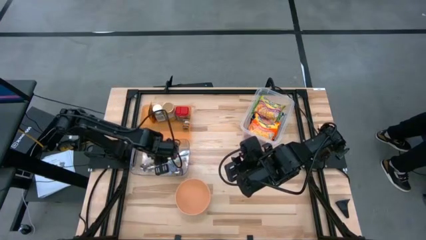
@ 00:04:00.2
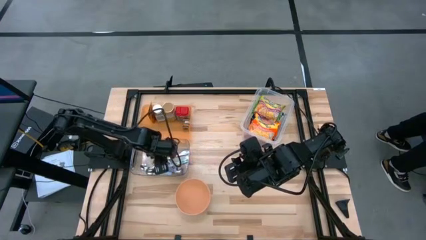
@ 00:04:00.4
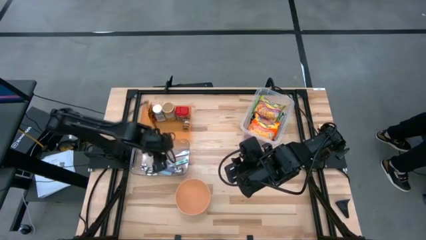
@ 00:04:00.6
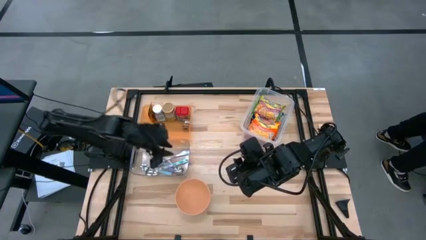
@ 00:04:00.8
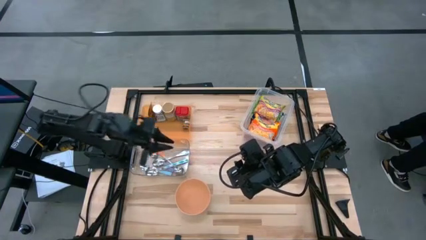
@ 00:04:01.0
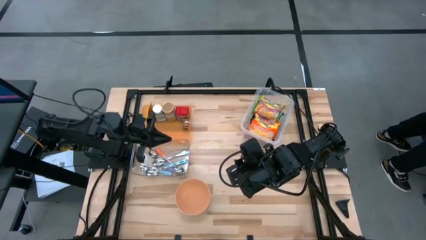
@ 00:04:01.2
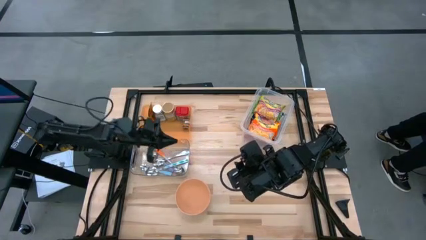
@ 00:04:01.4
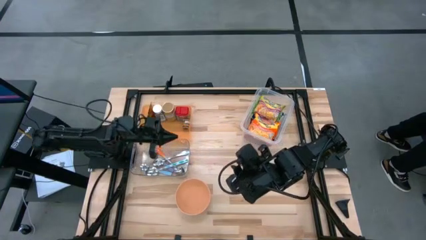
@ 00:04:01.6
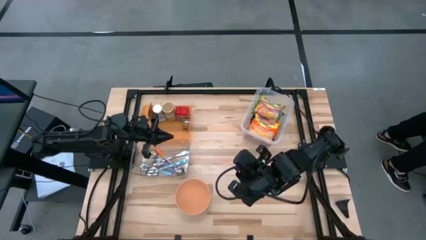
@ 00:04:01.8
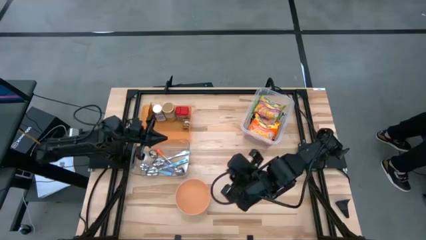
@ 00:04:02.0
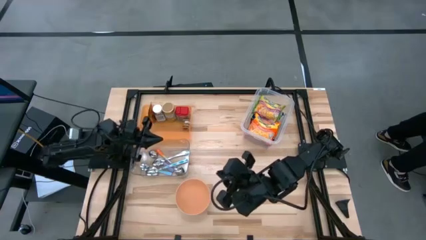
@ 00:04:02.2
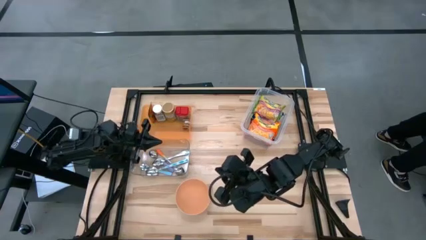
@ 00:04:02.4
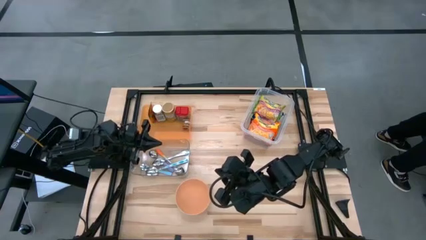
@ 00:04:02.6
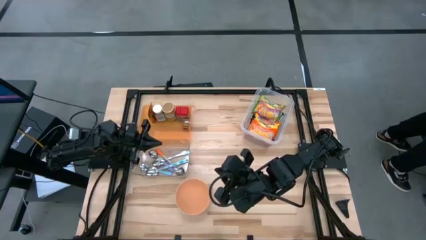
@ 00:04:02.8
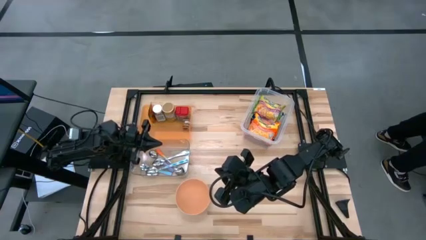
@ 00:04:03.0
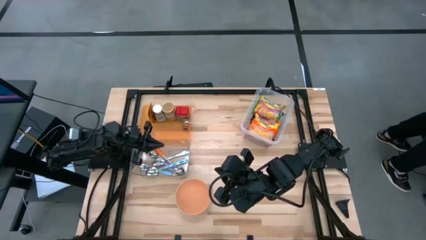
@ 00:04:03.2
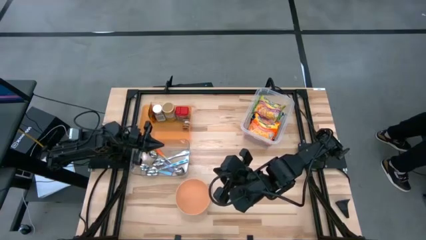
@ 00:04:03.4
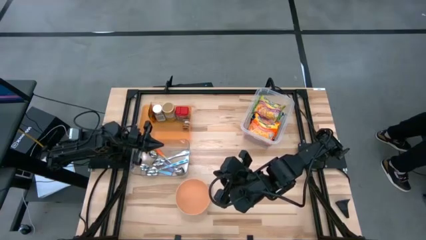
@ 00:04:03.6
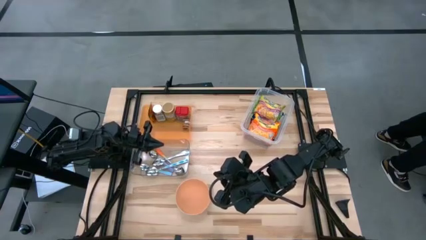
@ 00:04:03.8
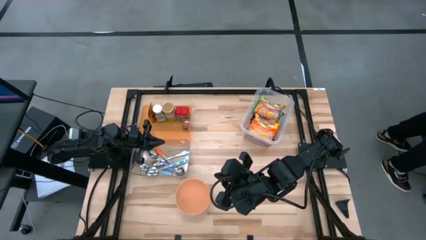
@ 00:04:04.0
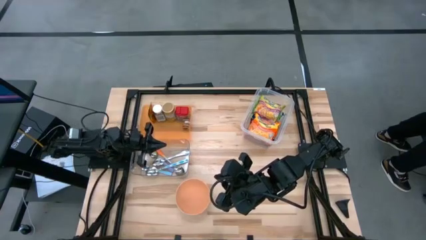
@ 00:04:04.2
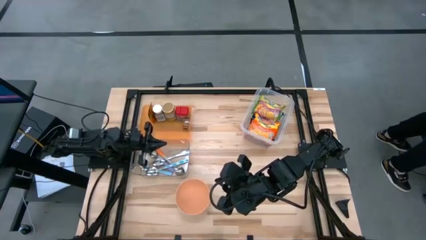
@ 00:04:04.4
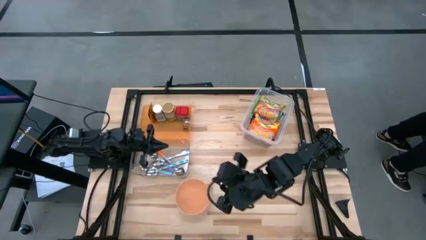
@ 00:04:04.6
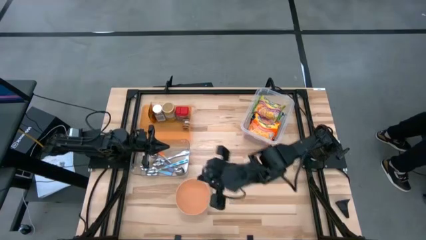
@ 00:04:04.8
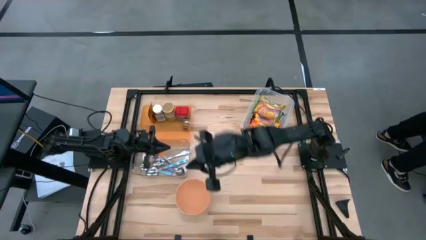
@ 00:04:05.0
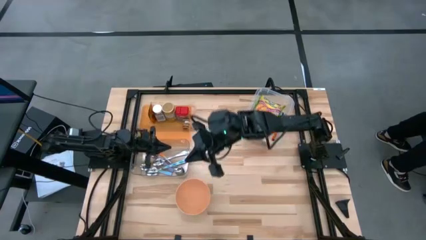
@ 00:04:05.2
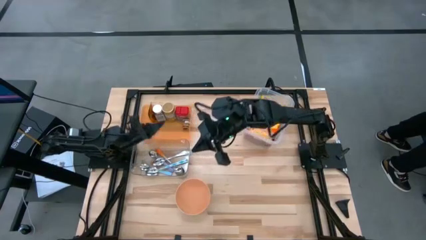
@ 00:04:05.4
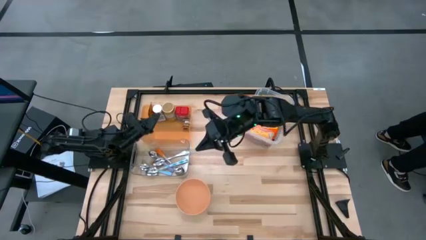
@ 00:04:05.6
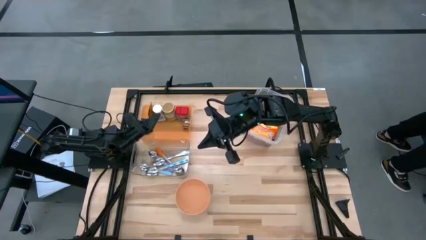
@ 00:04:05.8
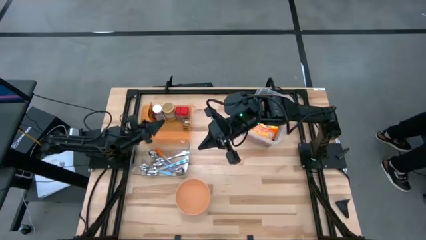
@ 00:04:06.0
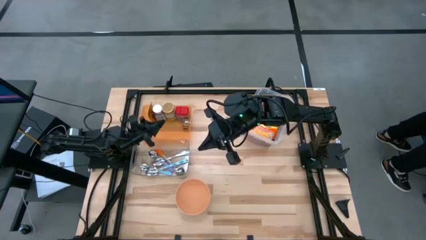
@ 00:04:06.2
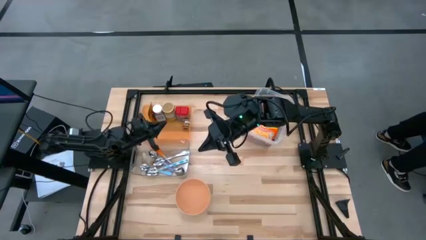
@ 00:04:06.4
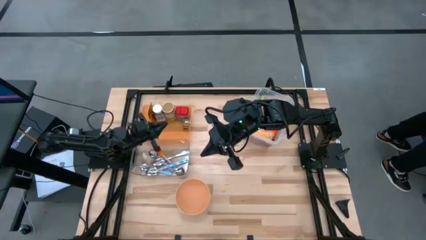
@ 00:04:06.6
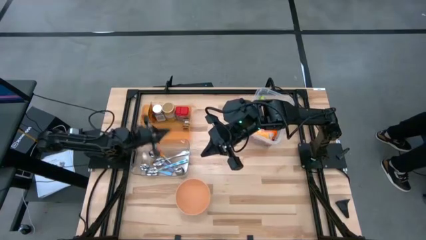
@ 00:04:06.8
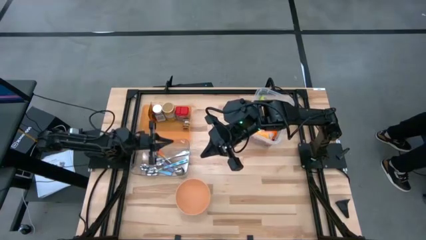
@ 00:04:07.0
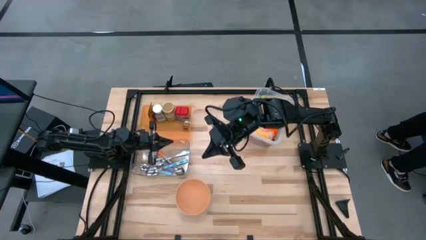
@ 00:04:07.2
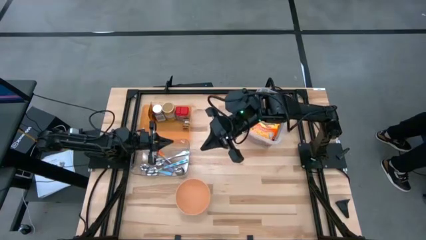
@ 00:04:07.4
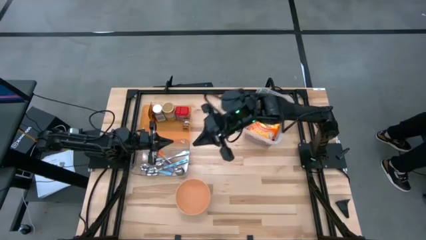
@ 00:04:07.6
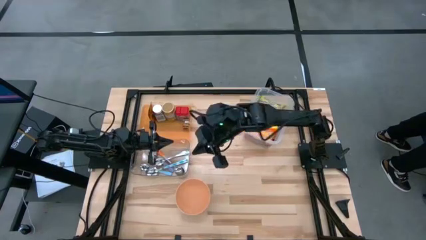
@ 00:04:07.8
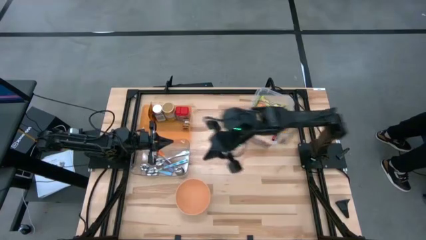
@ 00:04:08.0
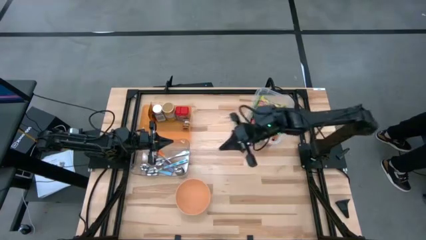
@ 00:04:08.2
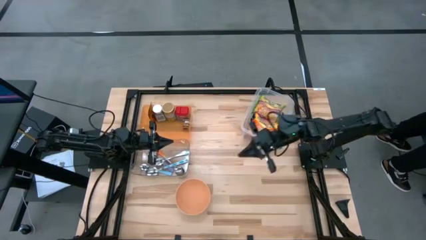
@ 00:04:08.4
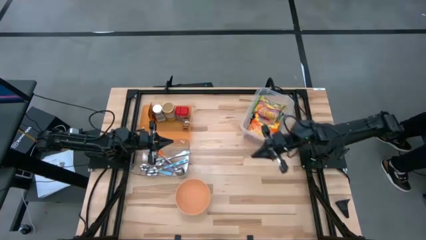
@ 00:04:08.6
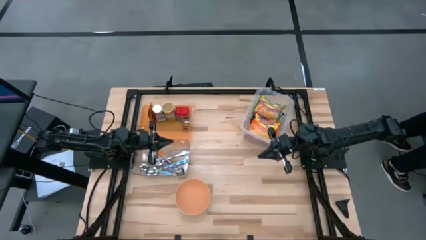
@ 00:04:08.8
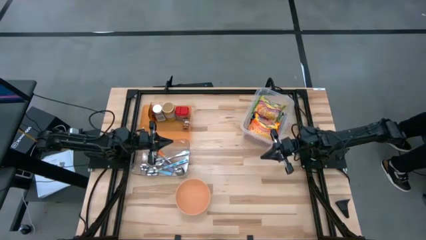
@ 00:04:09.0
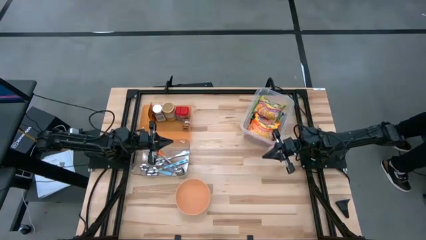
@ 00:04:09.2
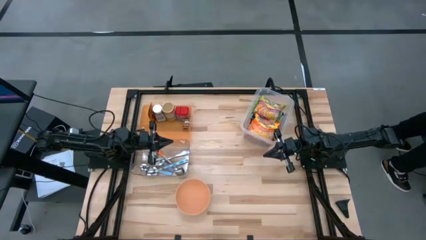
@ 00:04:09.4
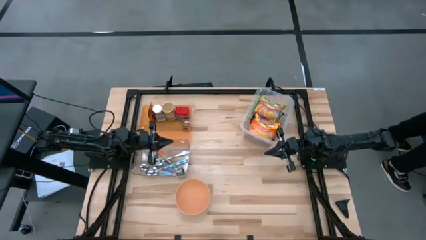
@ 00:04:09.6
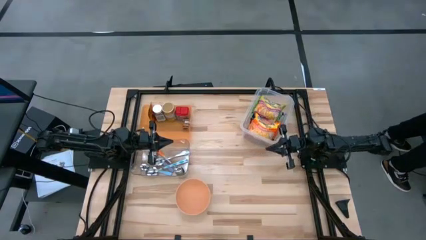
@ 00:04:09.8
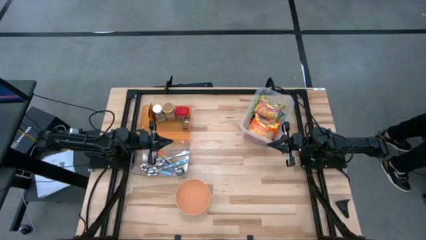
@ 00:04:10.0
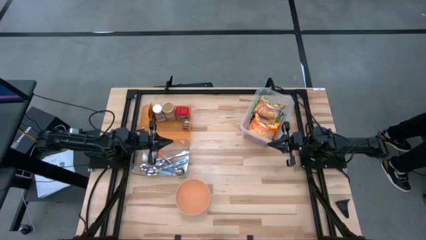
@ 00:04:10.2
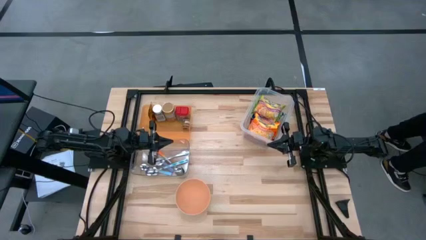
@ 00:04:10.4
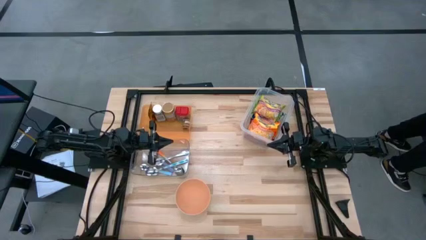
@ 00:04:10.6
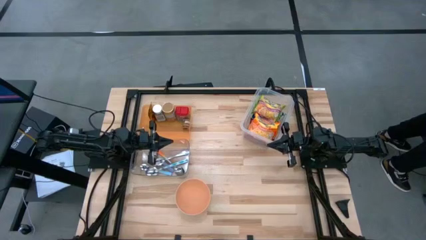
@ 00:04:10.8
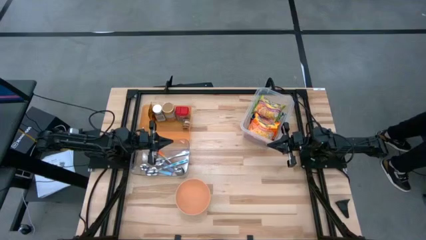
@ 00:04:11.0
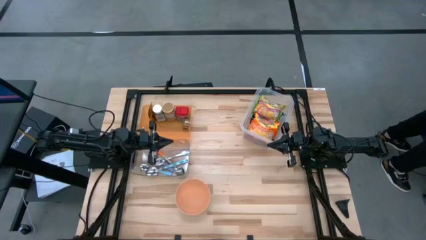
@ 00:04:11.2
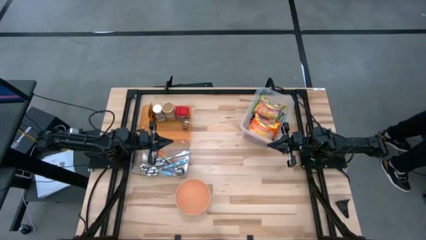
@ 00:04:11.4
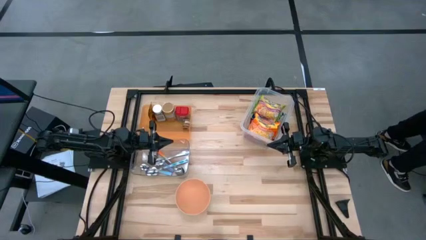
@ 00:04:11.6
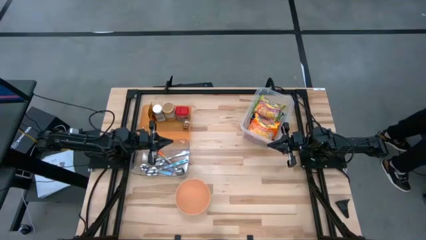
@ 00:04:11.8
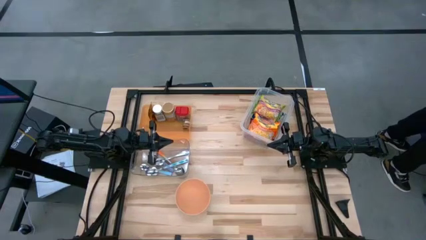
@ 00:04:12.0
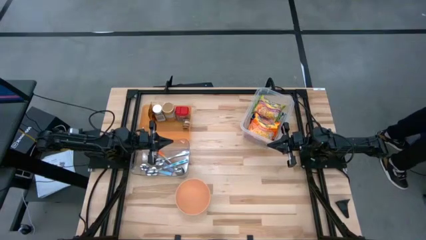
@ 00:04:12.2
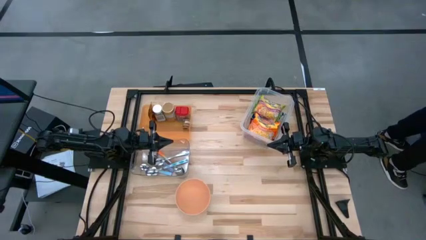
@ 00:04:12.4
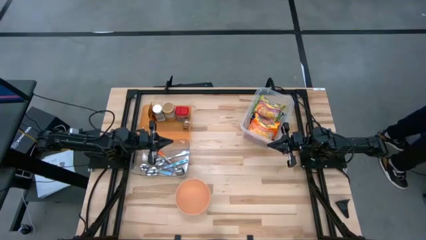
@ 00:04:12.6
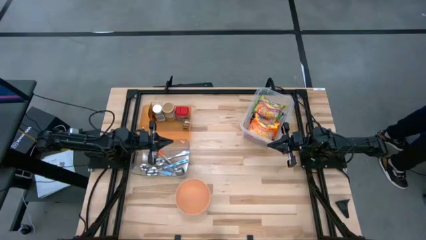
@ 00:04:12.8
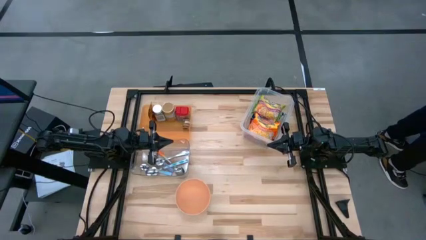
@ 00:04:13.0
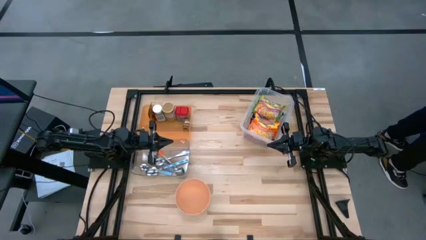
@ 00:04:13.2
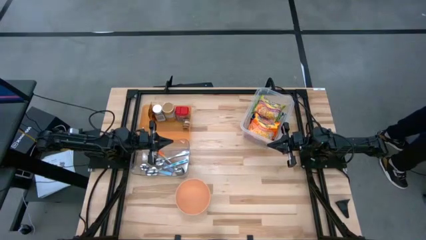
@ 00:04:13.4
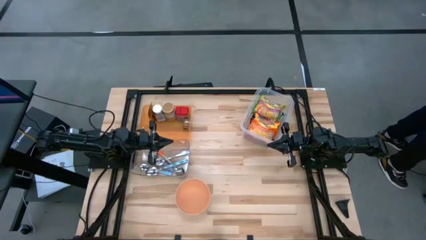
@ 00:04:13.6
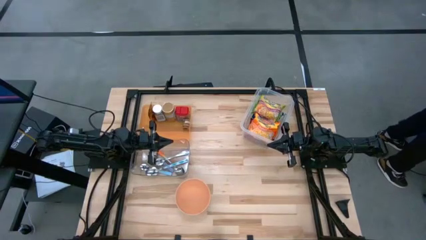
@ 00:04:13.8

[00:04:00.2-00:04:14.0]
Task: Pick & Place Food Item
Return to Home Position
